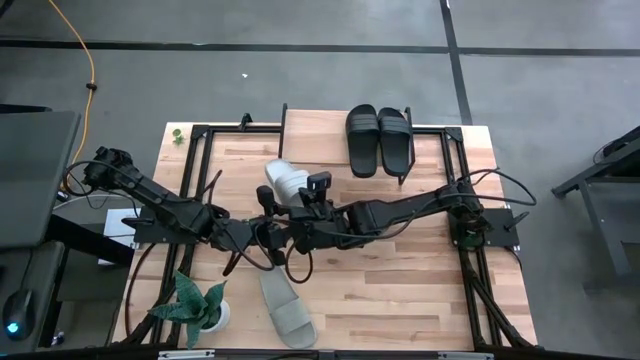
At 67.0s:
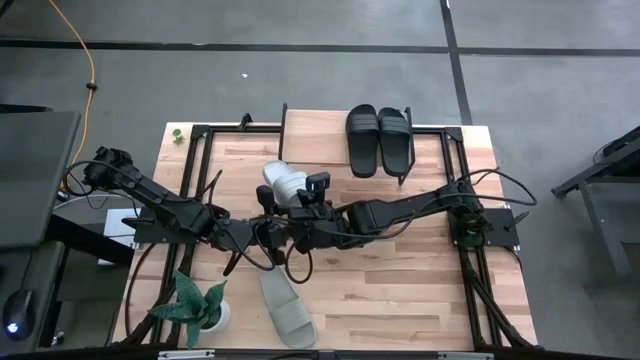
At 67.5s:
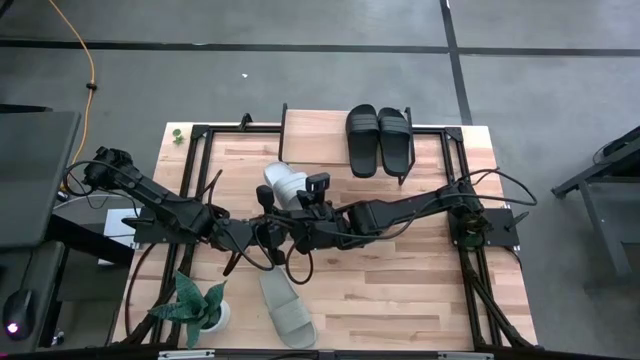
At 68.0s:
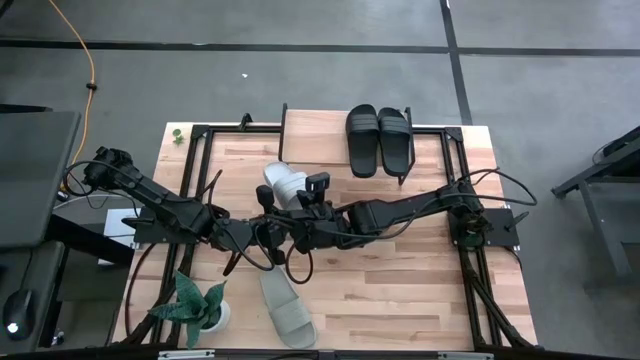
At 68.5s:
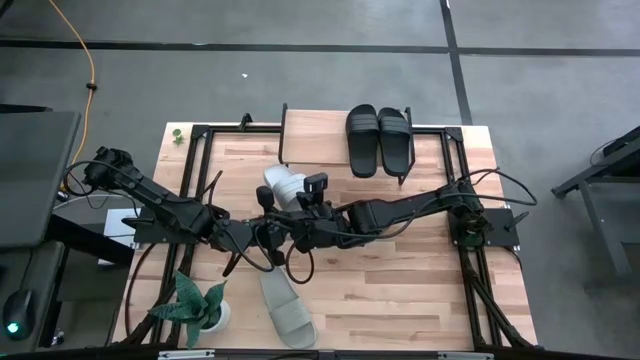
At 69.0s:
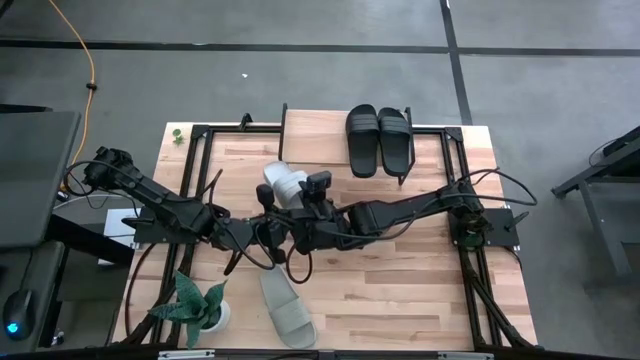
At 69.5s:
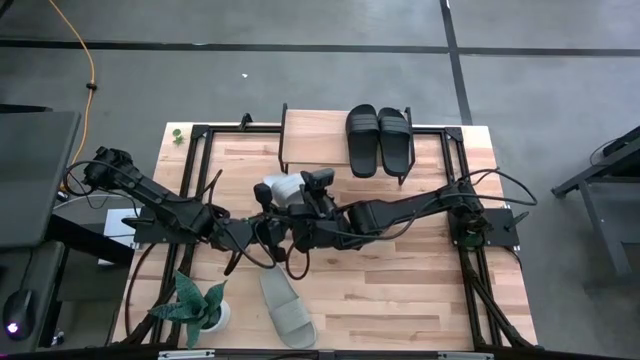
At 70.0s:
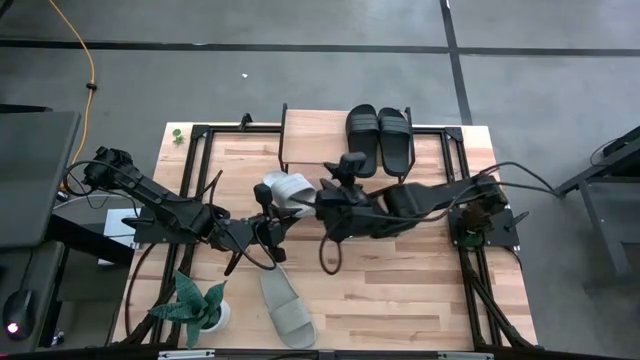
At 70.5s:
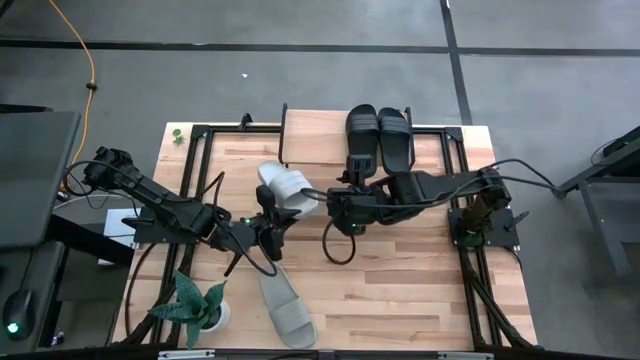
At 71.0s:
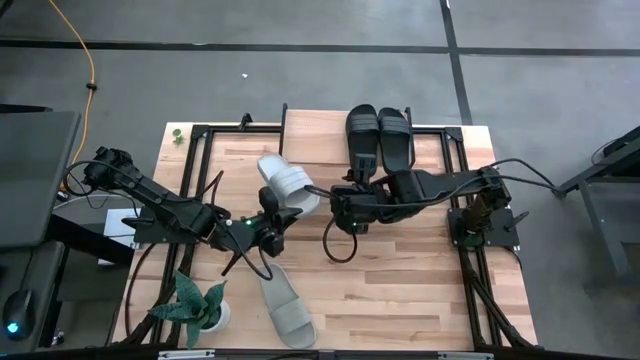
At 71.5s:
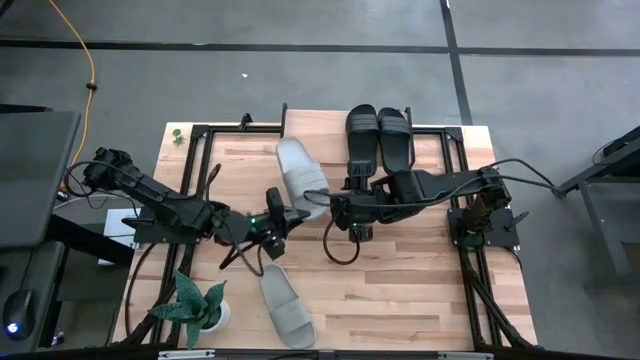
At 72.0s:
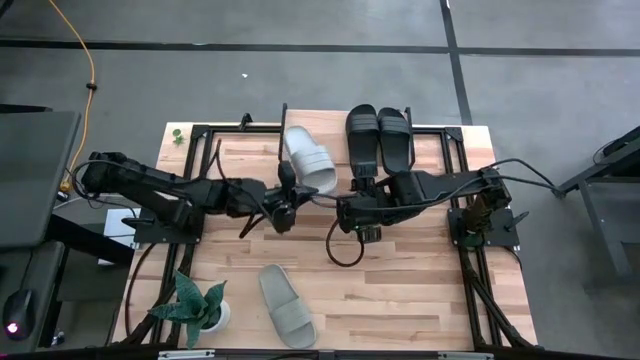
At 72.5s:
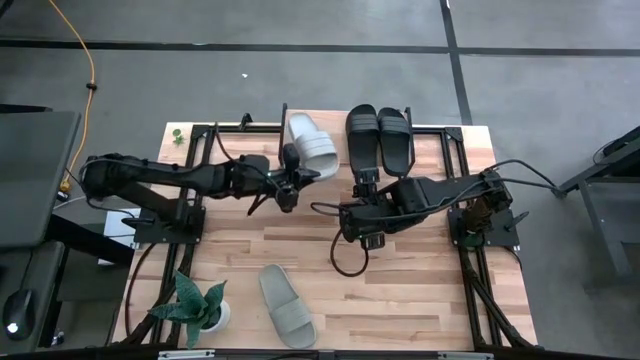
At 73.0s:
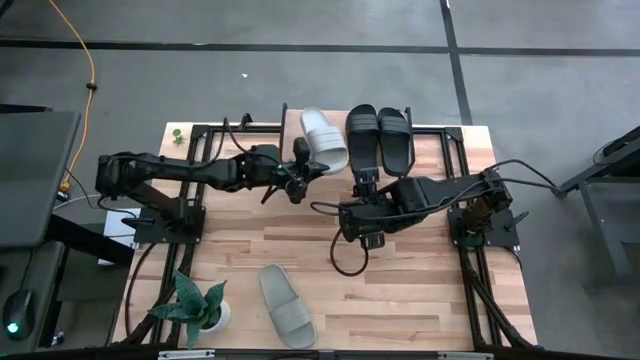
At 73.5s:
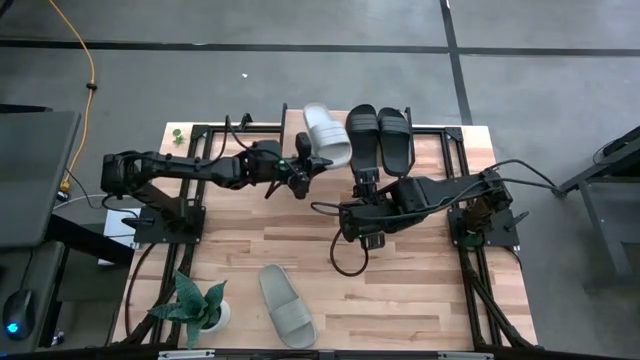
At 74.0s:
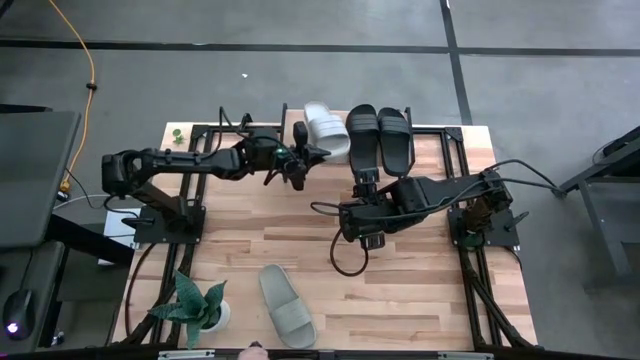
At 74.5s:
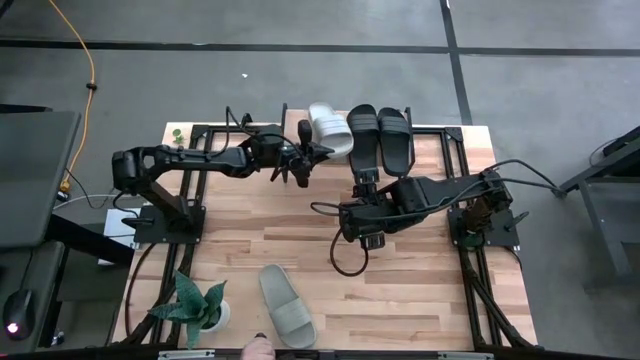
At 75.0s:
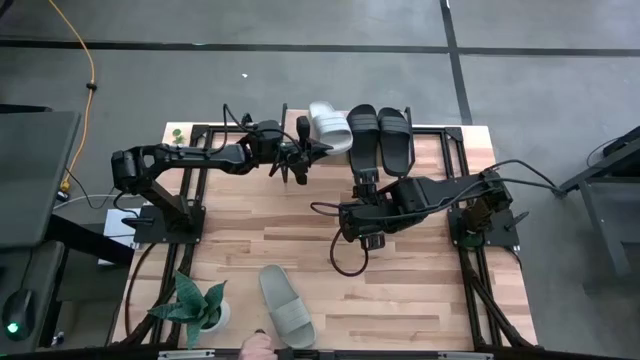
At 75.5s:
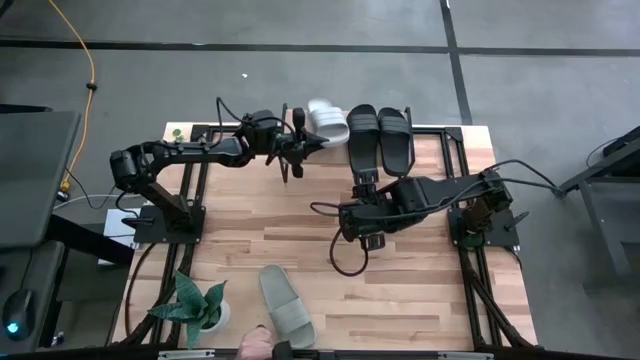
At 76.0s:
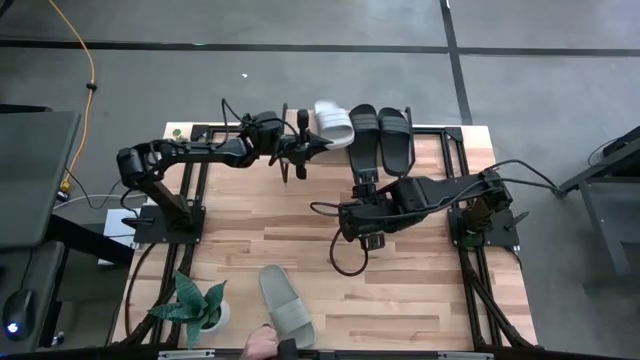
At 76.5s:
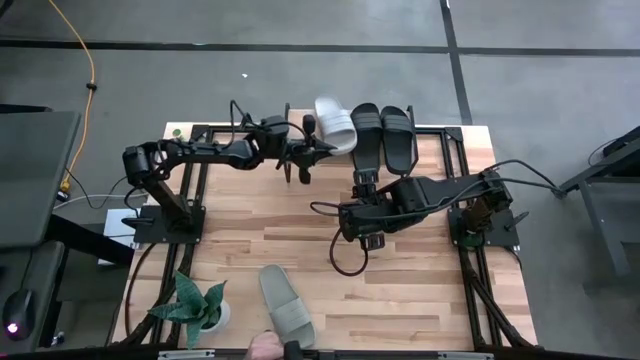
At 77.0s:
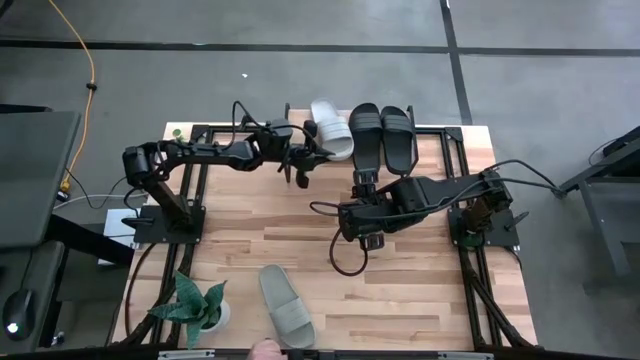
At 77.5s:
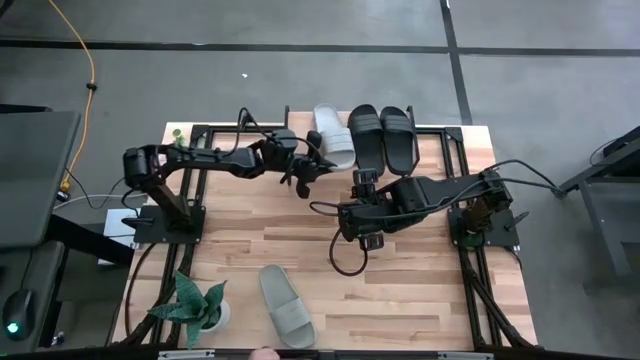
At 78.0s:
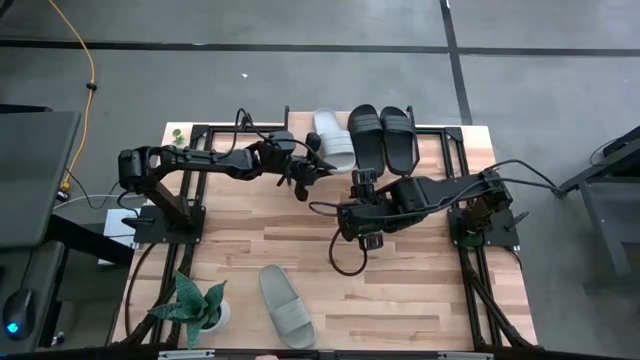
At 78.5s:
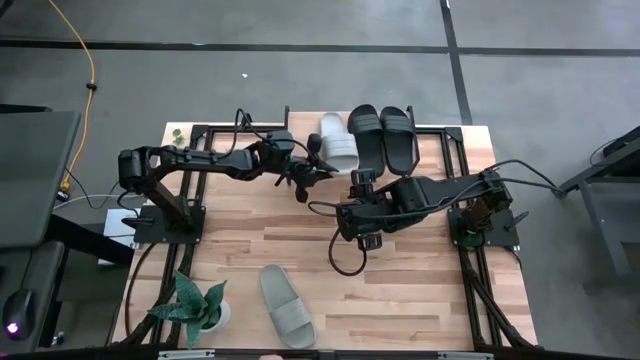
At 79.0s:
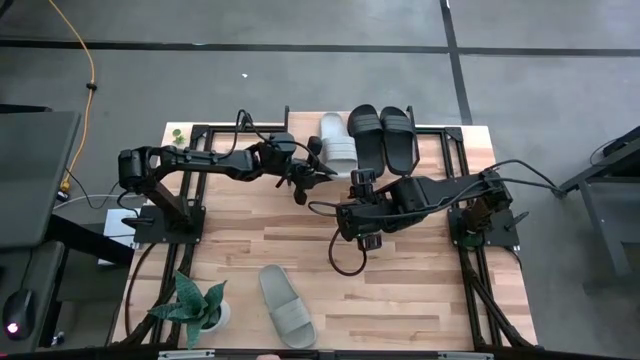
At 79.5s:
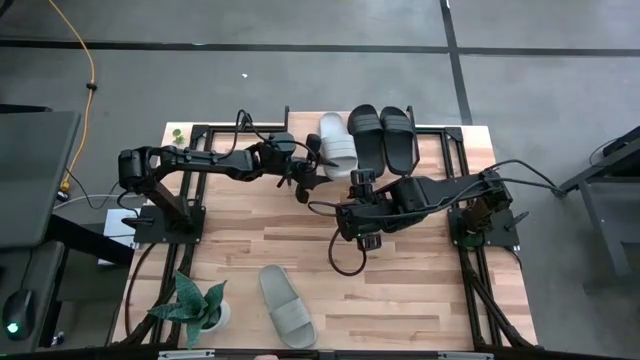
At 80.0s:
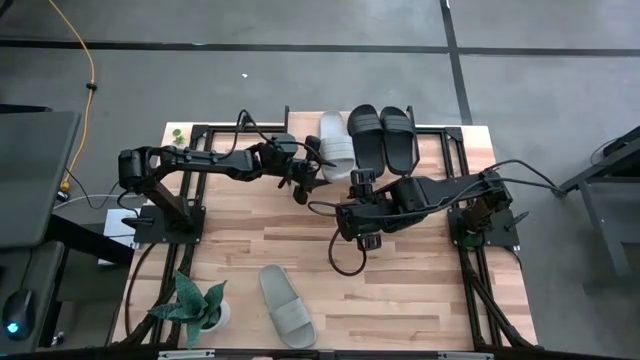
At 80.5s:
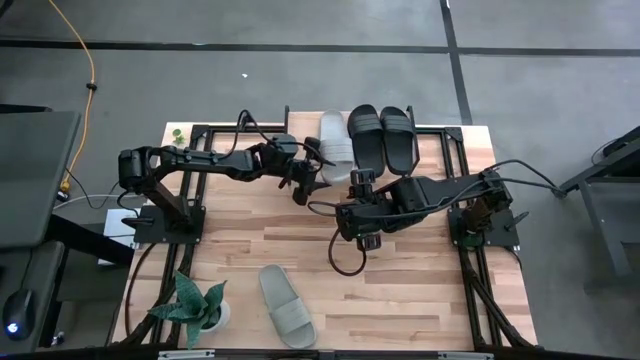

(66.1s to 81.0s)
Task: Pick and place slides into the shelf
Put the right gray slide on the shelf

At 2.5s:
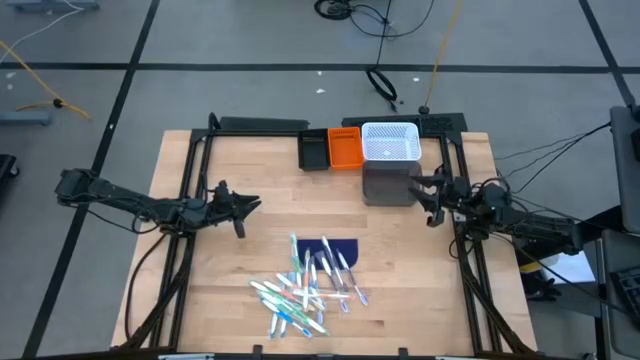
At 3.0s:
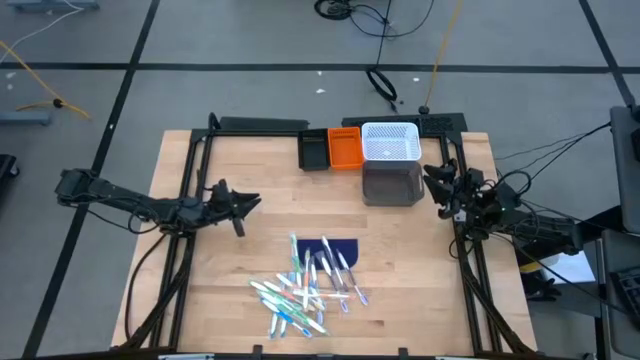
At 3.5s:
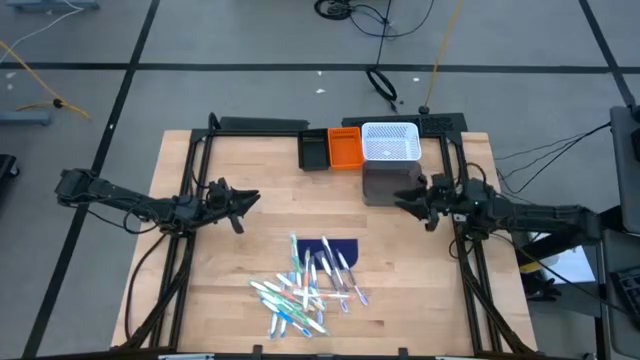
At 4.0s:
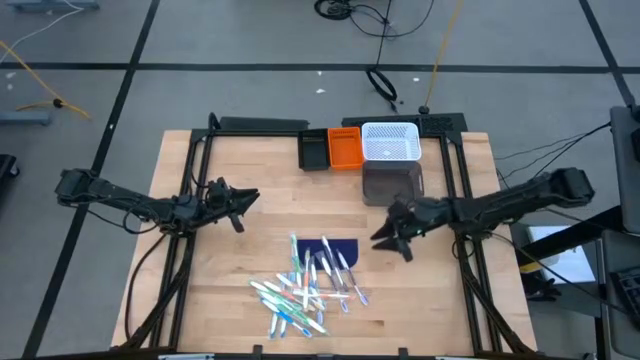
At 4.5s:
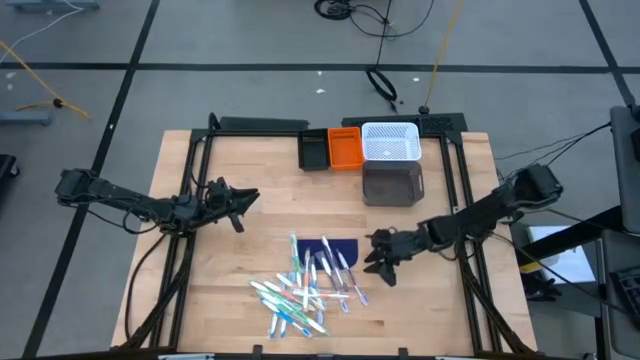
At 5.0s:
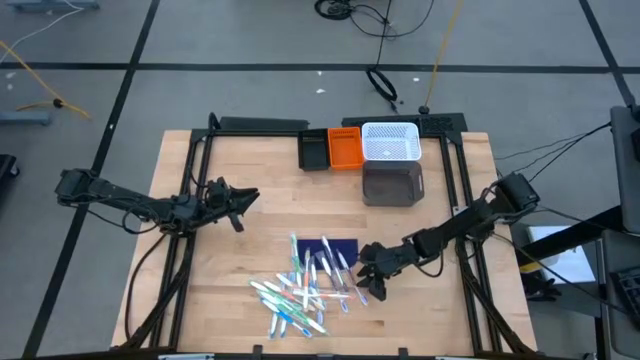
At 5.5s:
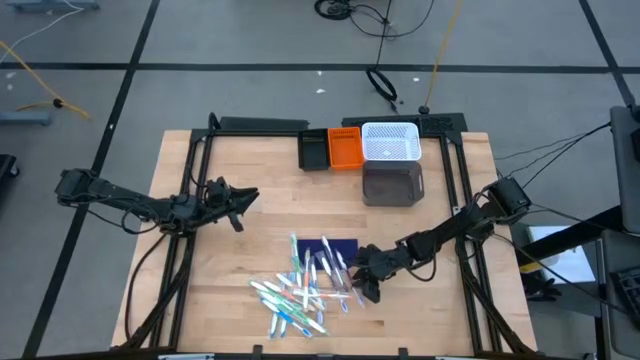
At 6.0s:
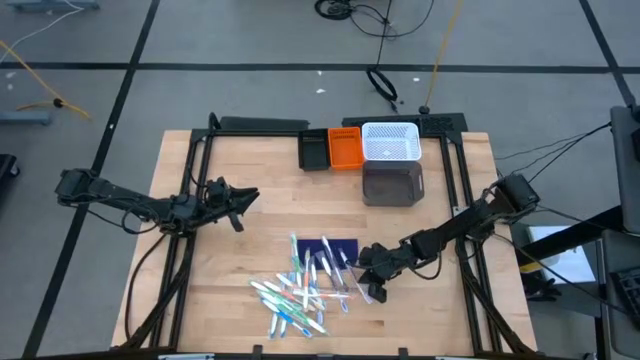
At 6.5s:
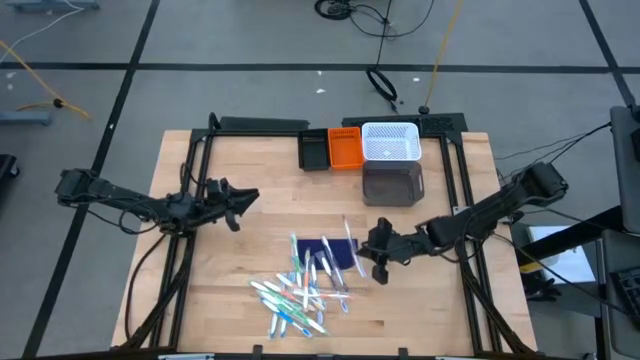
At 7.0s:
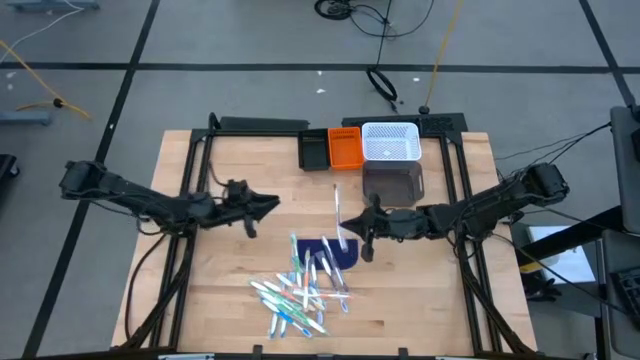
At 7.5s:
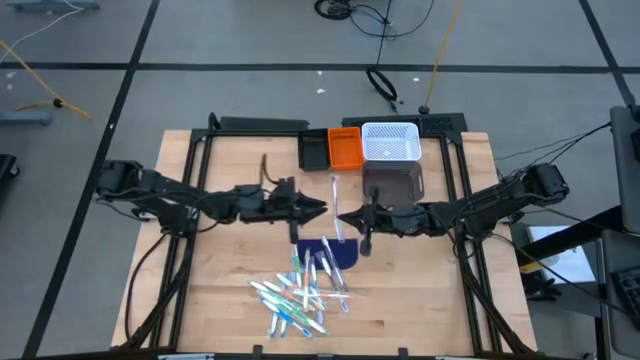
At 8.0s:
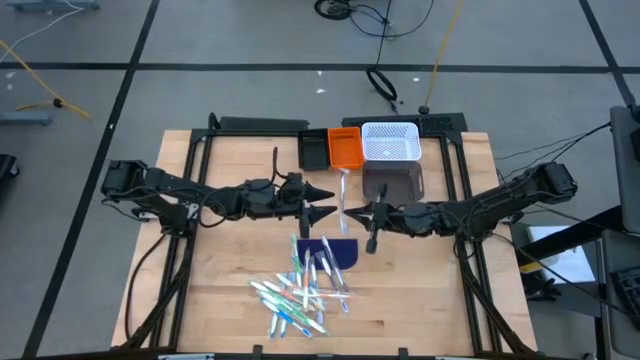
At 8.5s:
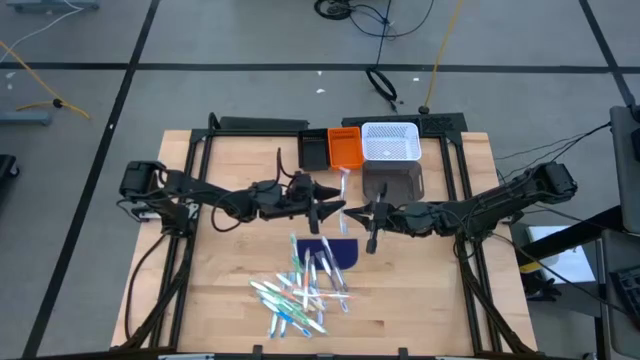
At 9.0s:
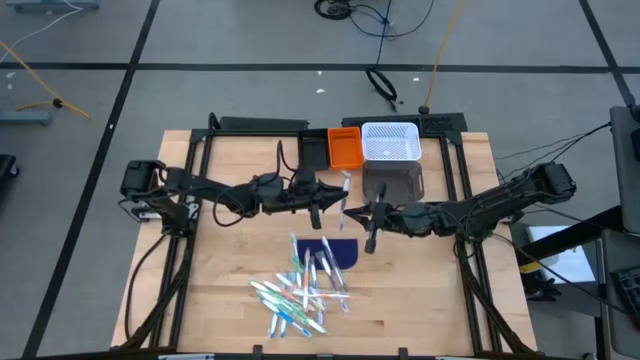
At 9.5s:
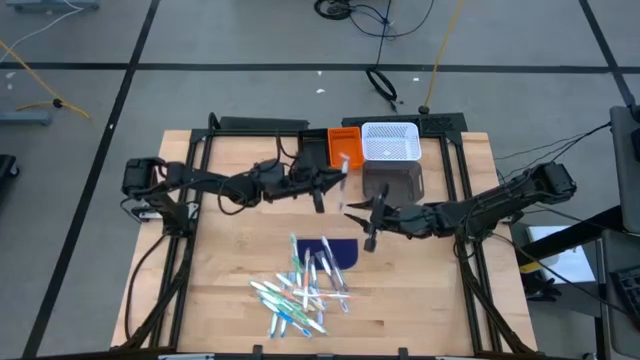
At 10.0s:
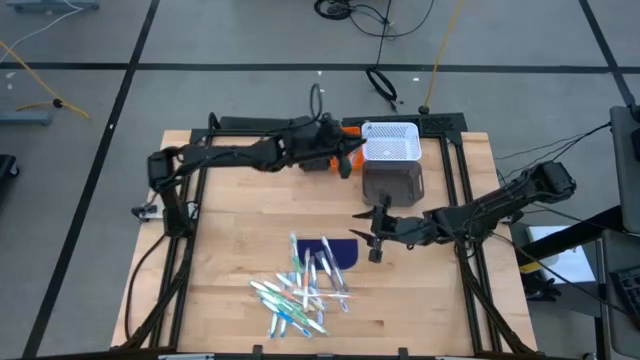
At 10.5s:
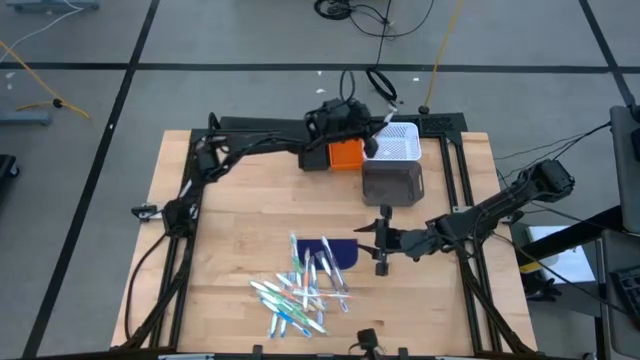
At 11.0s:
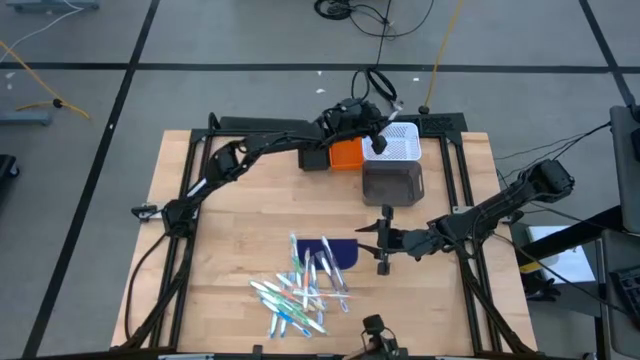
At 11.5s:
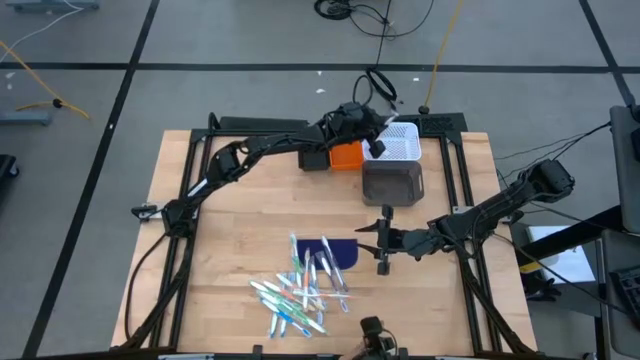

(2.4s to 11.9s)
Task: Pick & Place Toothbrushes
Put the purple toothbrush into the white bin
